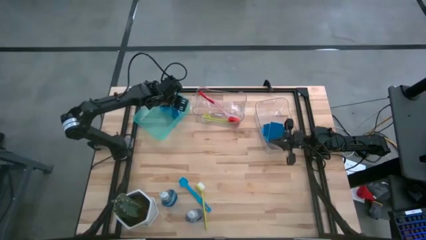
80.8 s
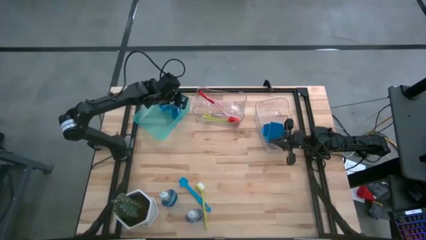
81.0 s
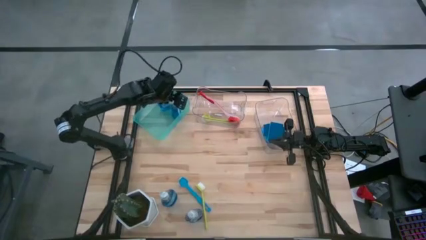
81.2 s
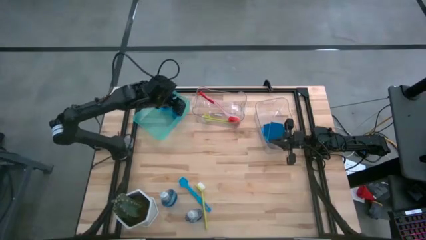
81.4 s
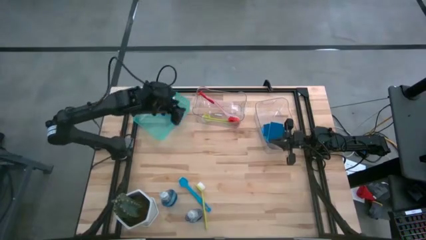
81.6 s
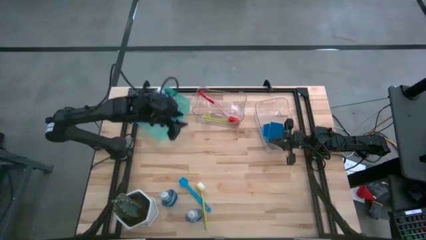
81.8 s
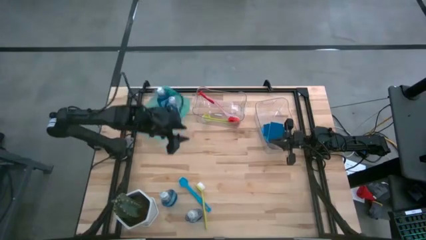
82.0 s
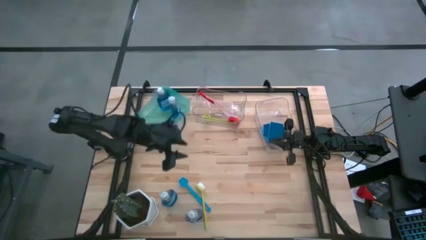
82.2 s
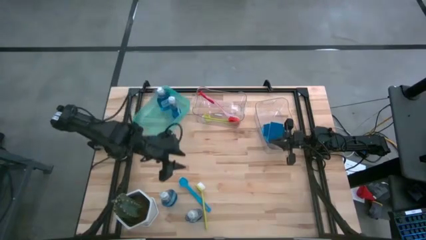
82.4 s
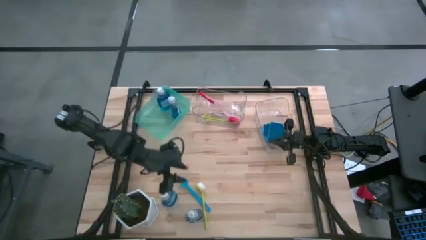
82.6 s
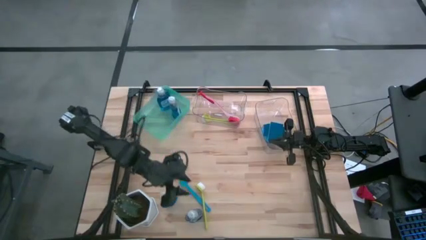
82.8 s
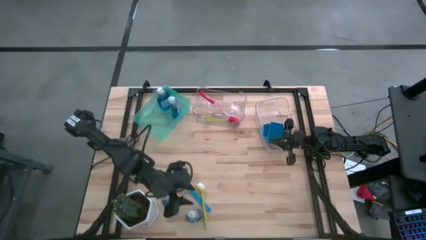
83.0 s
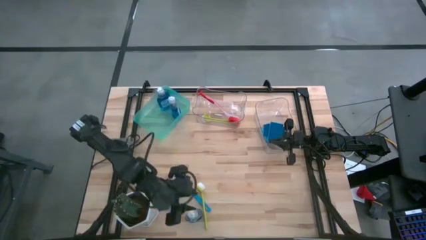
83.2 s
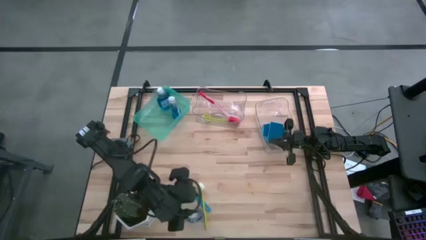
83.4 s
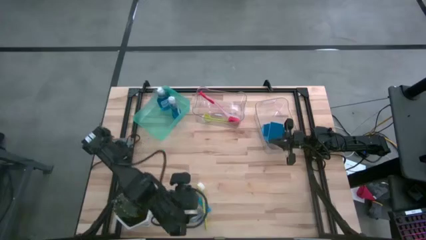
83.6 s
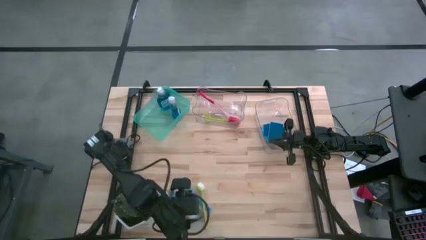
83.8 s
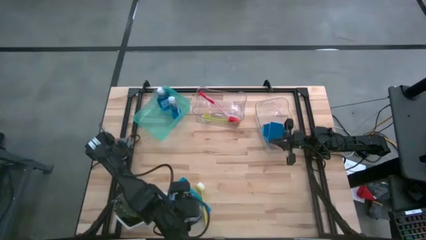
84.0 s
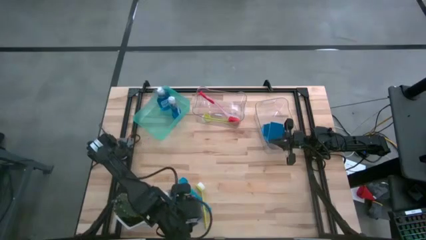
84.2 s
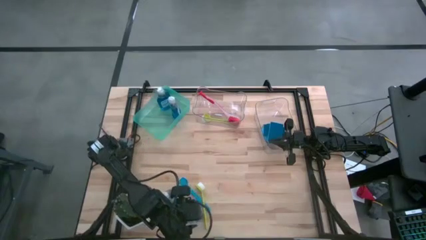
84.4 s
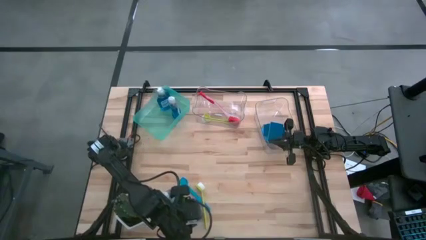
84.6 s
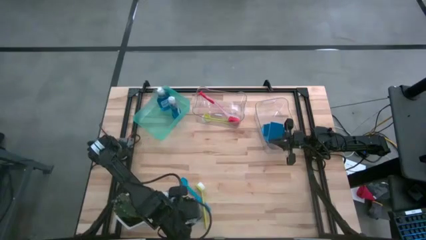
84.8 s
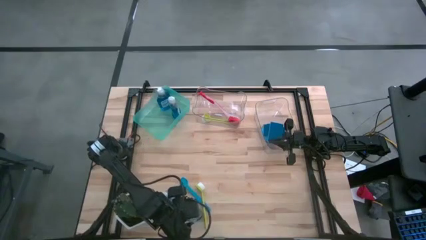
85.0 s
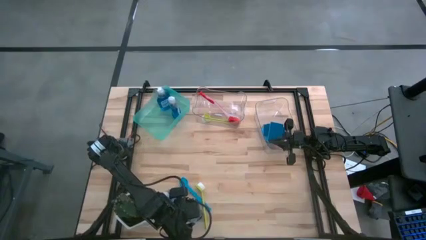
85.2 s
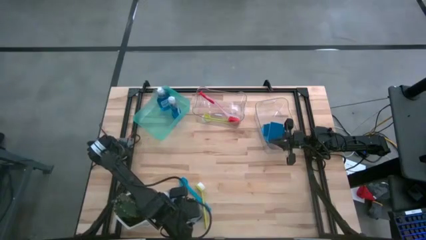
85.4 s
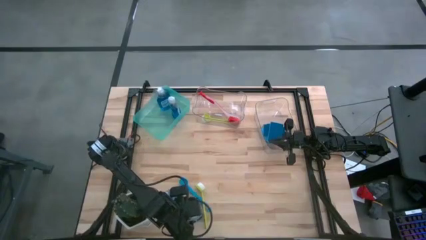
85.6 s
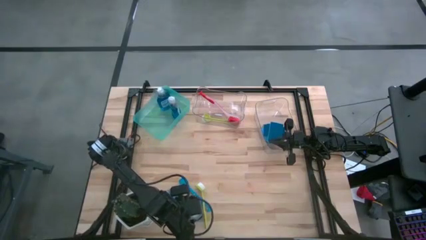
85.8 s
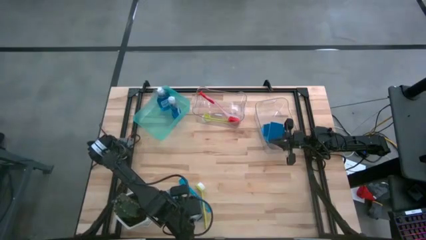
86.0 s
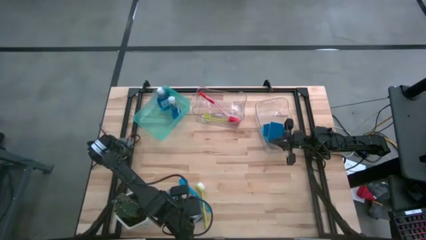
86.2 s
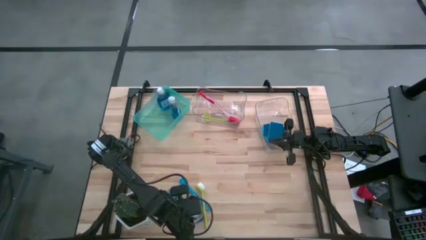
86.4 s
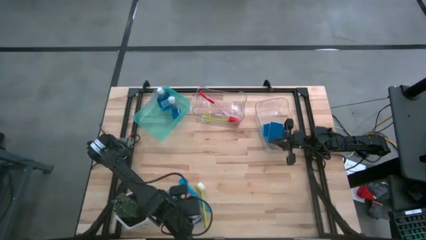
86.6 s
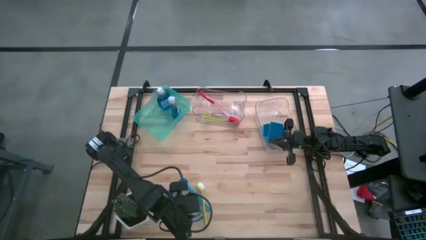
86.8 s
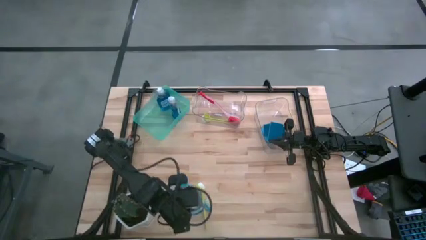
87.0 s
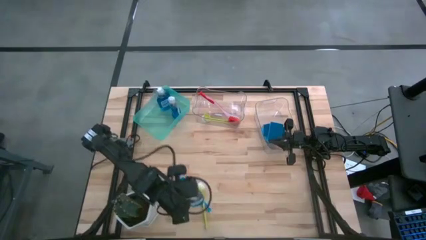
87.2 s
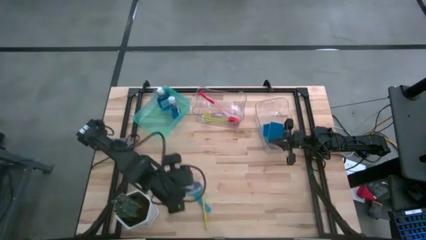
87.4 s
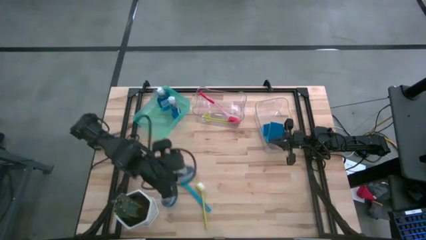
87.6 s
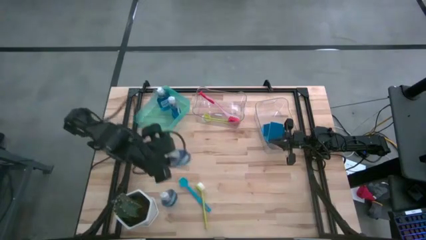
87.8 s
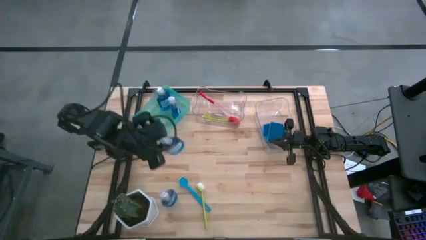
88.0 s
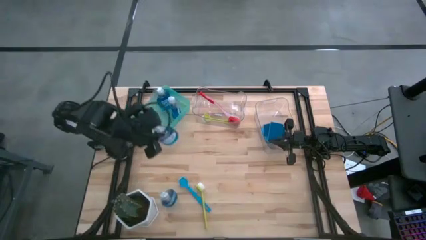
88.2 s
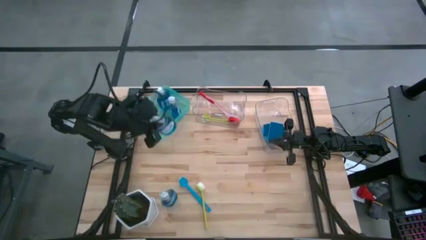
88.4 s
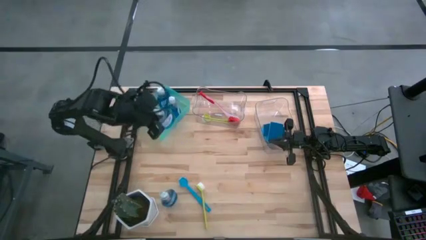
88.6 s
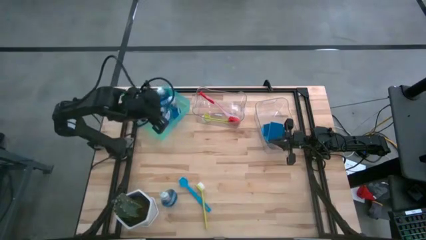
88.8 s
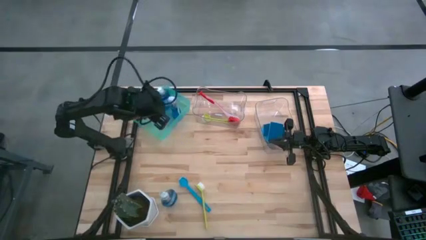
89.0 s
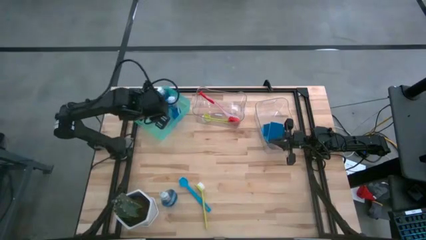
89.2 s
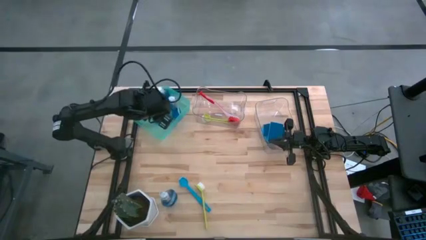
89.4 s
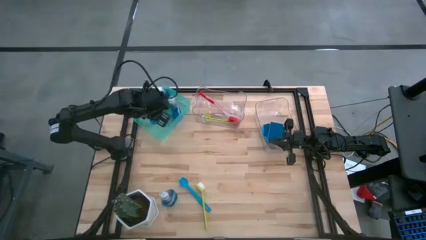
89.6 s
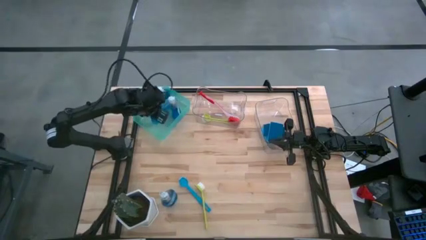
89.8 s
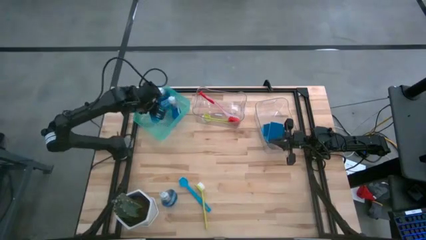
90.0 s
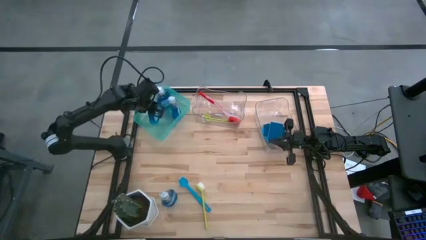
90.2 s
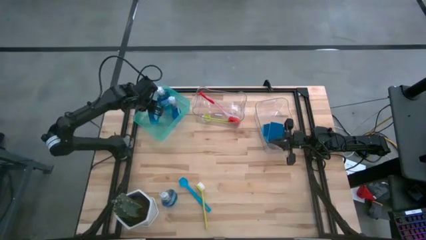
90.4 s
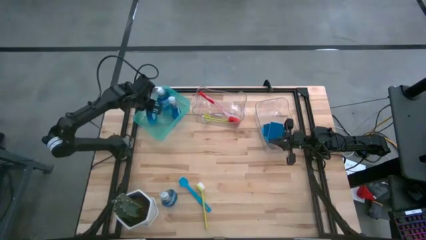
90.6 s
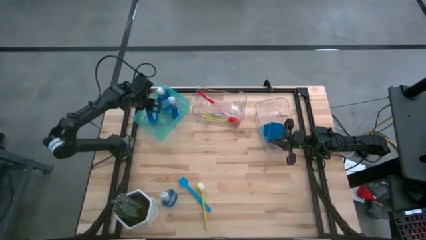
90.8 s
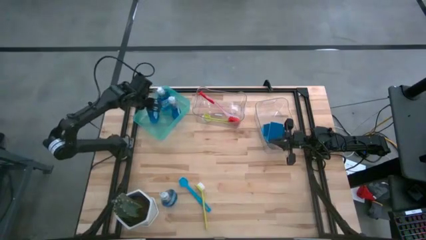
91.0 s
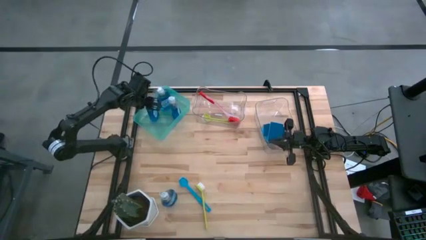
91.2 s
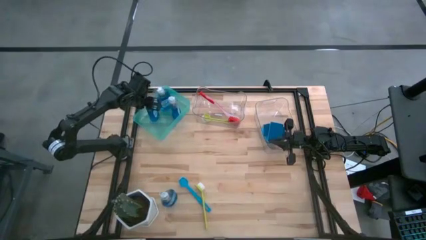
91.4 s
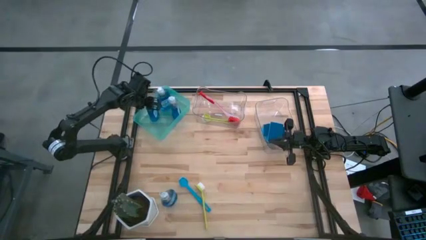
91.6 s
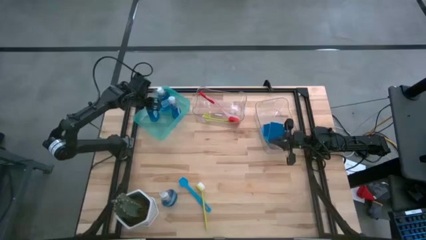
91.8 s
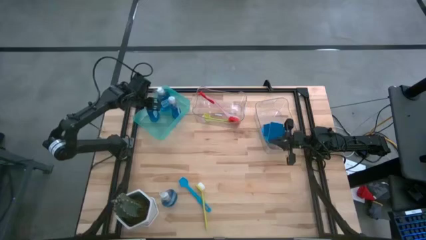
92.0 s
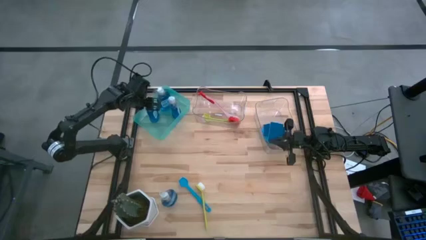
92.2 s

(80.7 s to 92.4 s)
Task: Pick & Place Kitchen Sink Supplies
Put the transparent soap dispenser in the green bin
